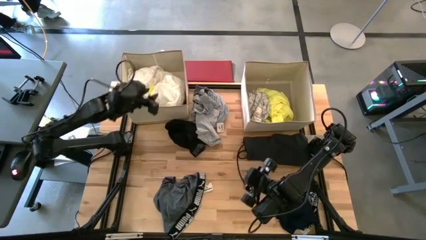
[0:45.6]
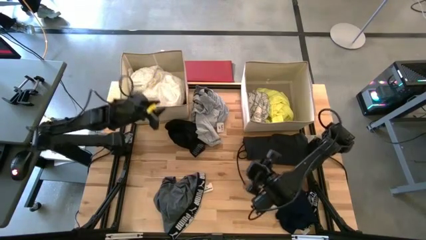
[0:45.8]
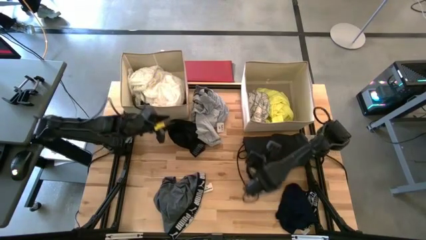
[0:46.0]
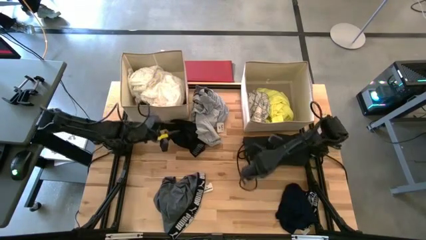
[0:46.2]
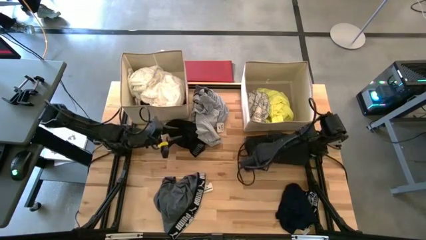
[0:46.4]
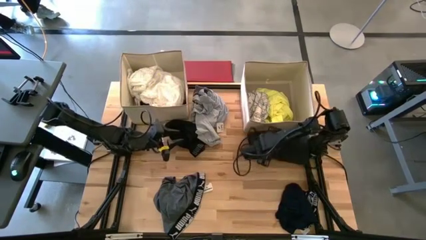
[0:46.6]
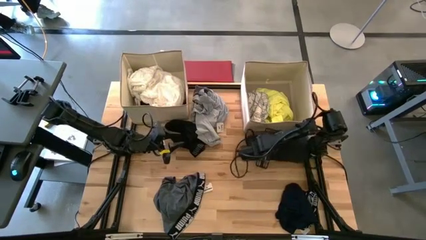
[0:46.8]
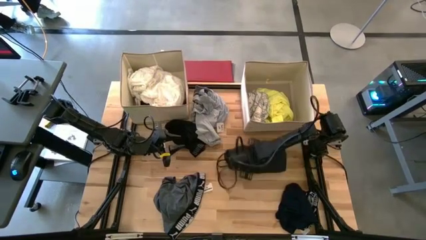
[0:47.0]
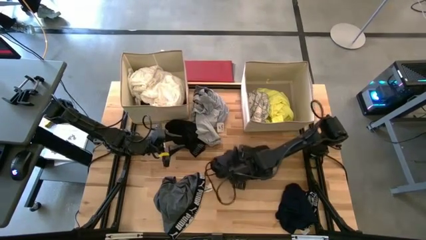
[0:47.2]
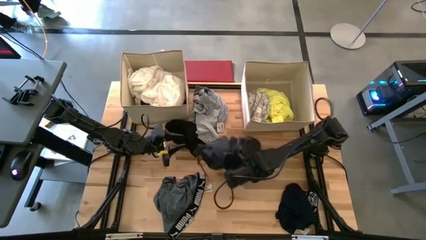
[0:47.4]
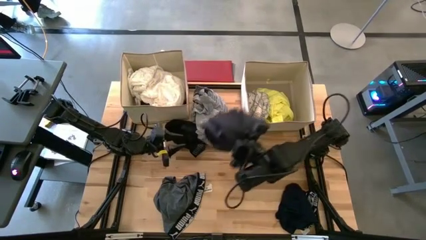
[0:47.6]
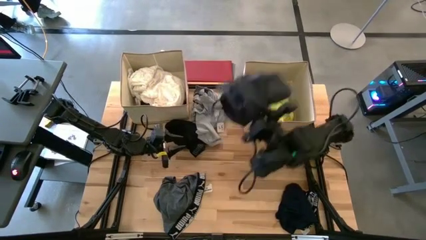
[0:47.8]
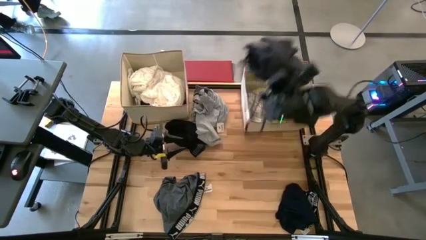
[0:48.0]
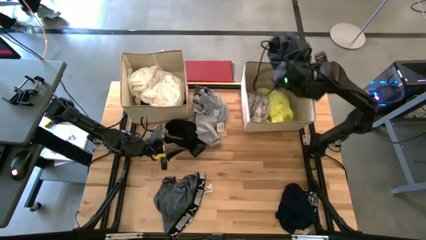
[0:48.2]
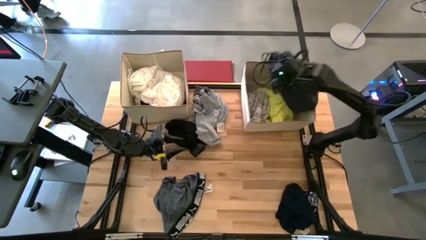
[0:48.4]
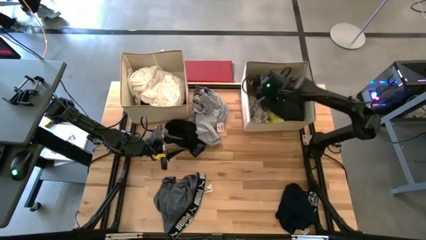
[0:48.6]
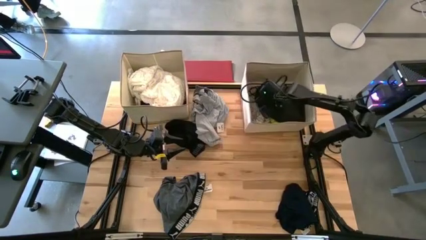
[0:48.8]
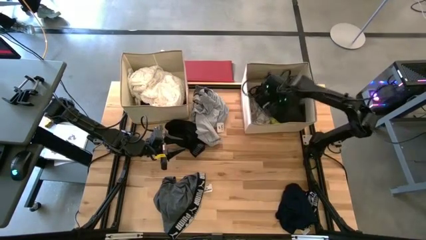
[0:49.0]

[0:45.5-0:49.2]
Task: Sort clothes
Put the black hoodie into the right laundry organizer

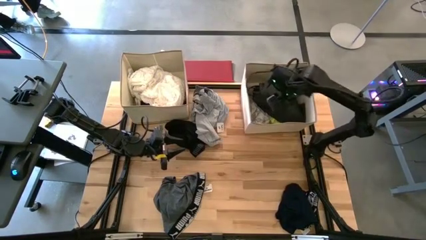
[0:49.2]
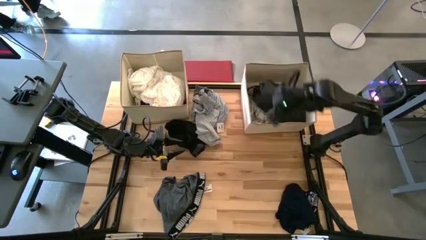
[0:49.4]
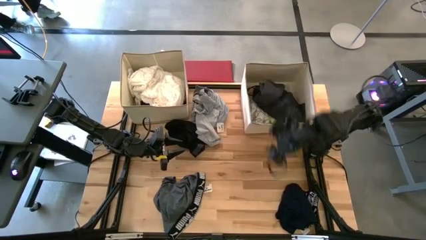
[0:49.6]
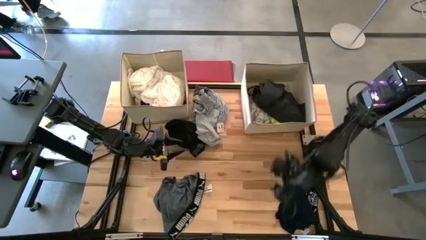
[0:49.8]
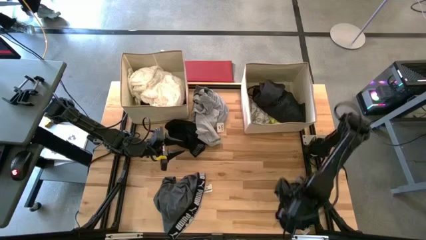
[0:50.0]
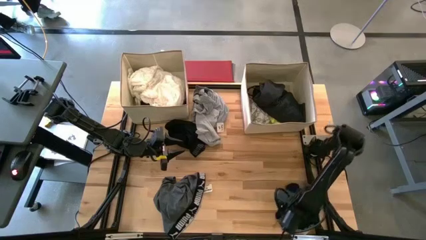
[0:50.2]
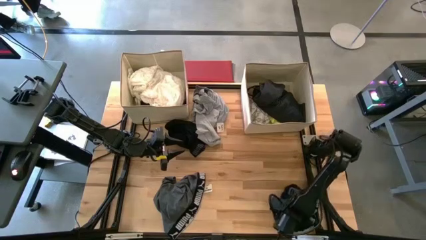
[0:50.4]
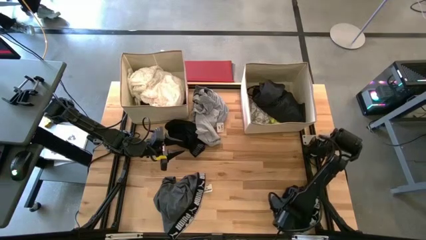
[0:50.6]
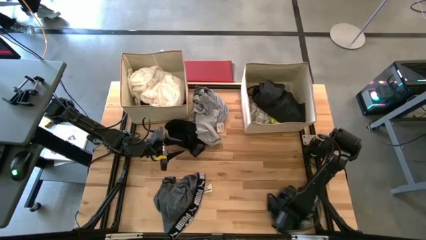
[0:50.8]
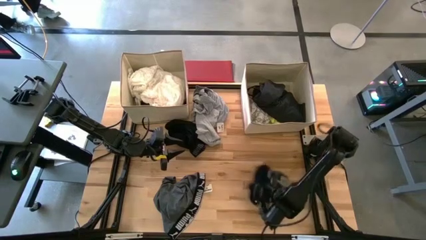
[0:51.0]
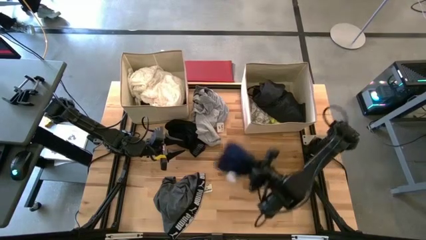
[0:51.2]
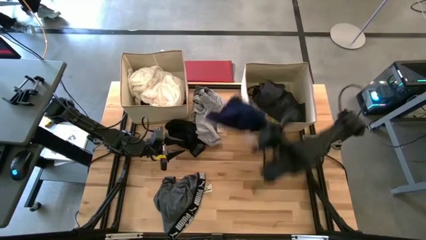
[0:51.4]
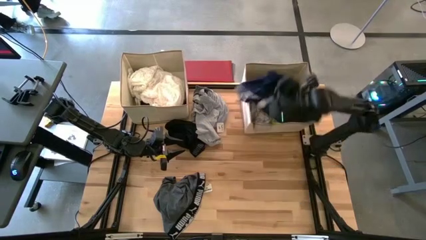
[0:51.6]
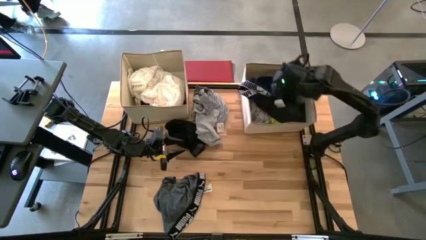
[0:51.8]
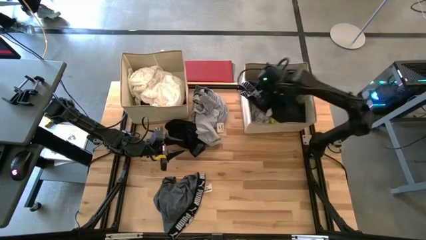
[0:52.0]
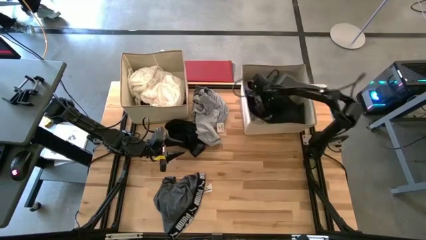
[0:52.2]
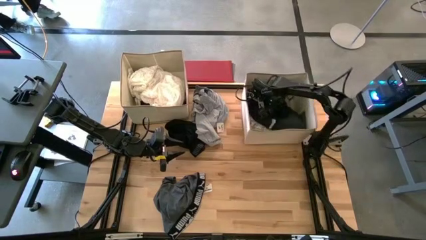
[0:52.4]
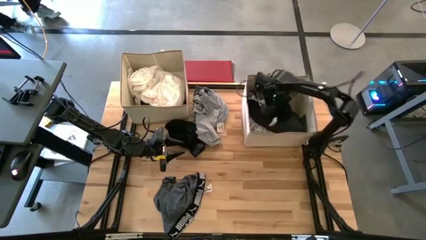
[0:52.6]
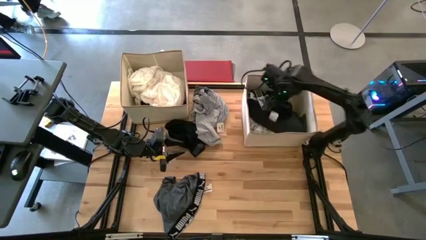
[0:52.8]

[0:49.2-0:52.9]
Put the dark blue boxer into the right laundry organizer

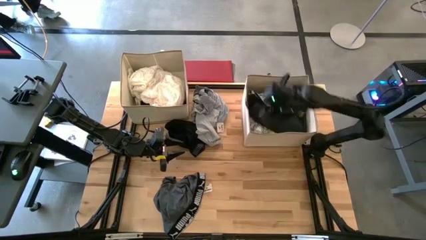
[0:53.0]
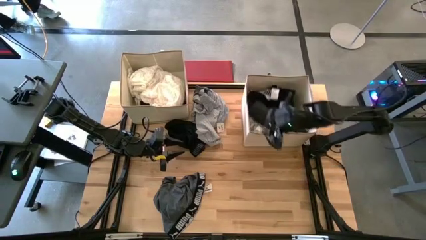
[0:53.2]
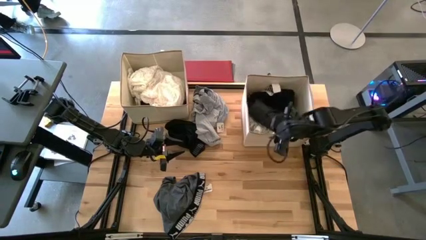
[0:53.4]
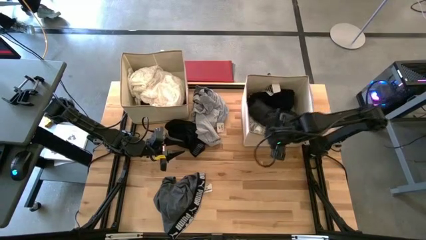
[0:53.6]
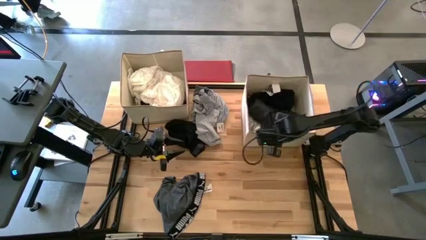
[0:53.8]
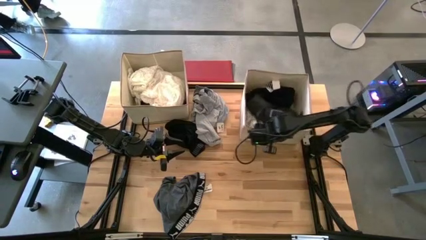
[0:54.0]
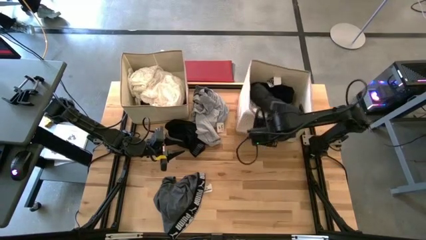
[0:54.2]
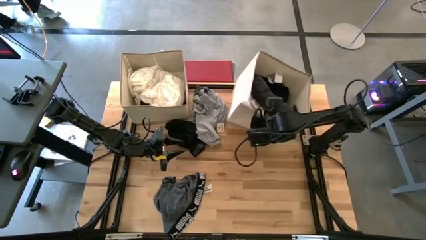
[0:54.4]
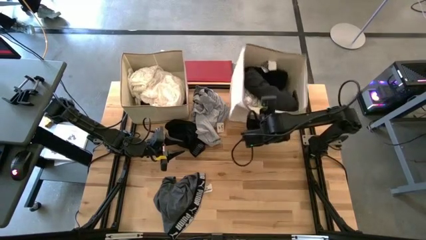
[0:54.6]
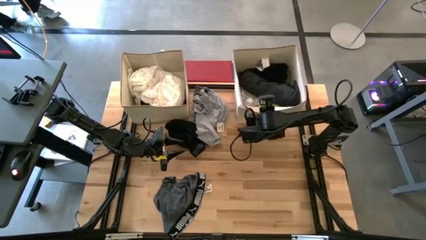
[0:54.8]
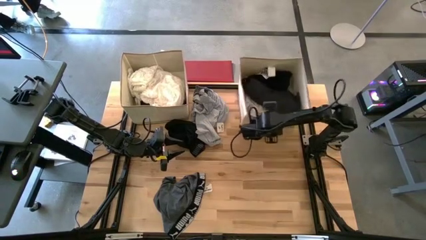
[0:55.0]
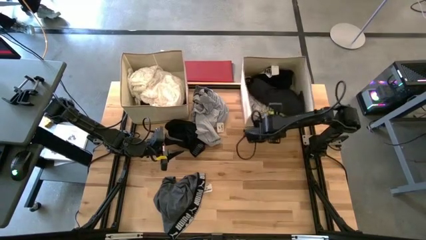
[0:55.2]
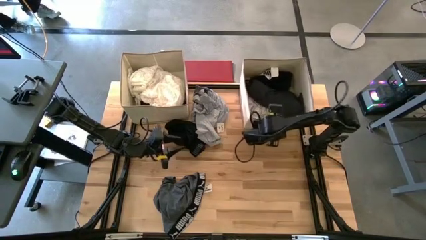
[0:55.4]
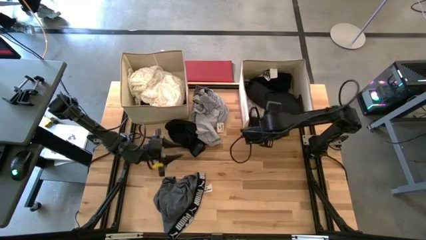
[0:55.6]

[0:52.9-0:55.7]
Adjust the right laundry organizer

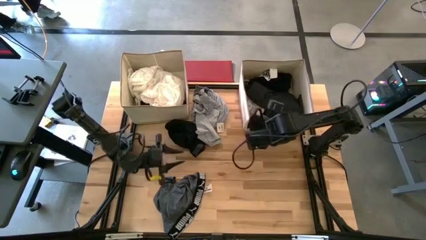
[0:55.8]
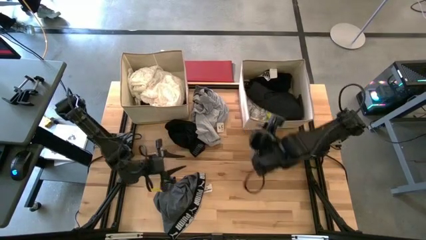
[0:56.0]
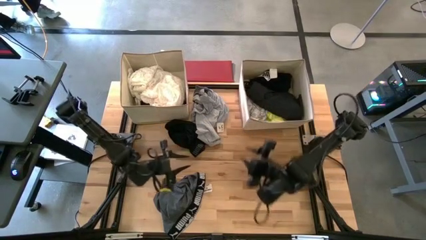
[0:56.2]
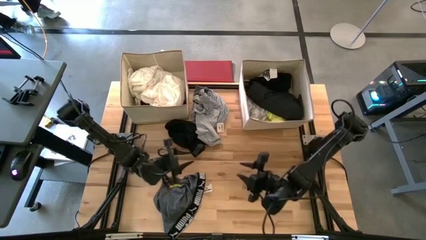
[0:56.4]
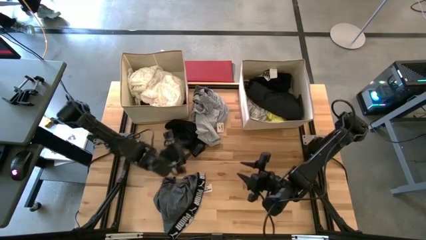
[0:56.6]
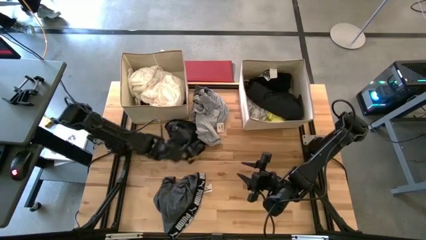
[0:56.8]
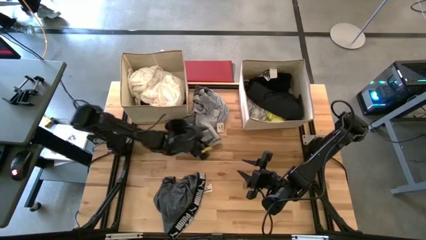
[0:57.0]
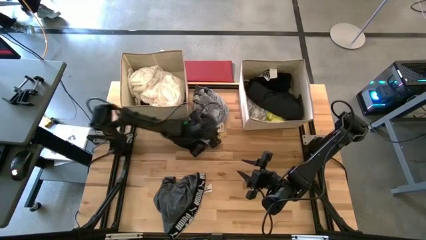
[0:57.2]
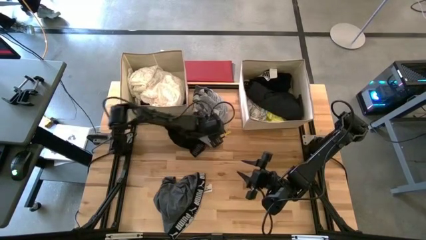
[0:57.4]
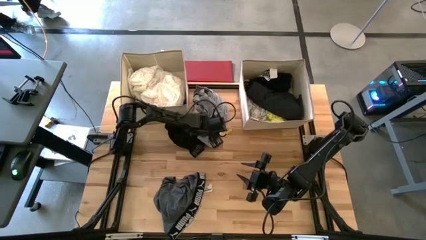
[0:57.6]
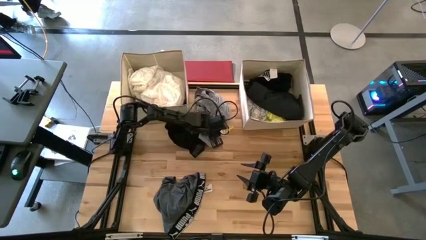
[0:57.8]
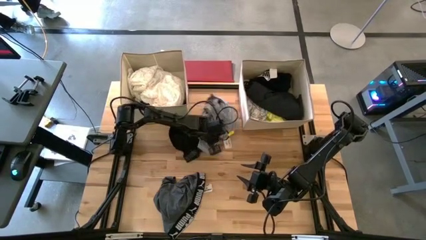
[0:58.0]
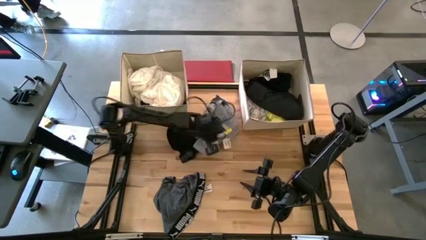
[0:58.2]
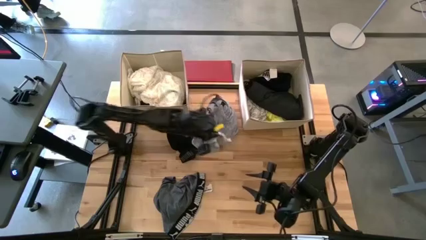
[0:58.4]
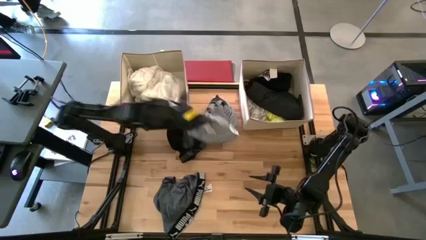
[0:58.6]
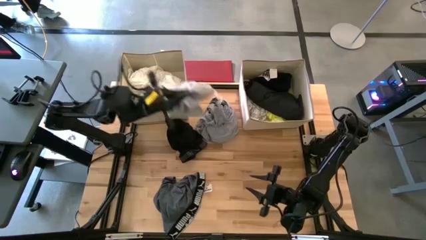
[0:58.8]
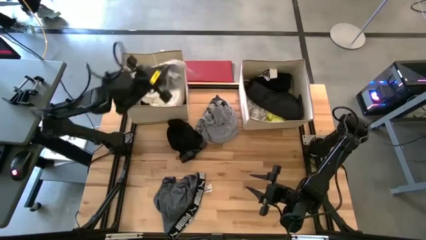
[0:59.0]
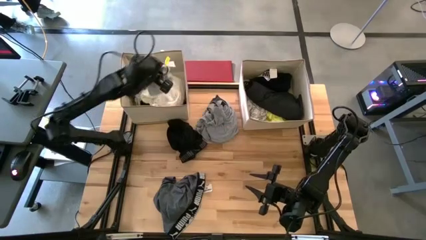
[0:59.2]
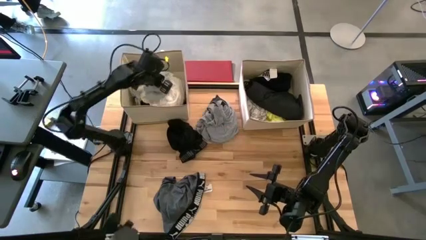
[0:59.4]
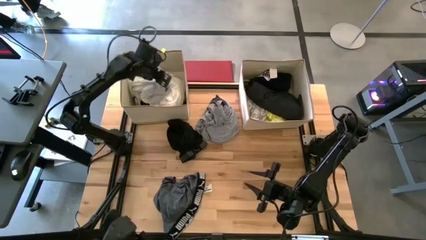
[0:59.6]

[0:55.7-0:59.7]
Put the gray short into the left laundry organizer
